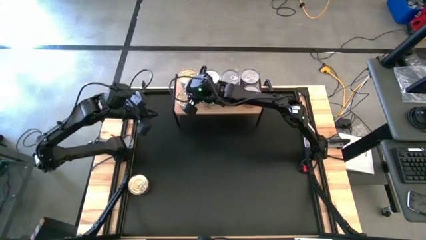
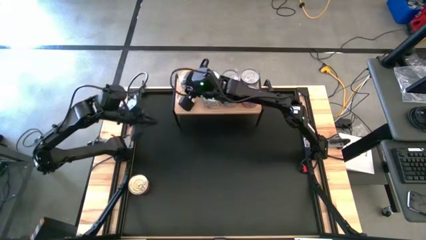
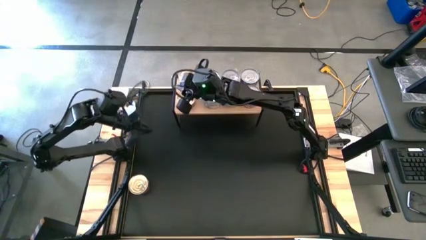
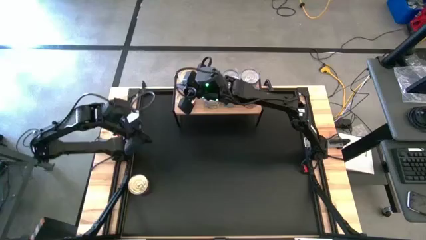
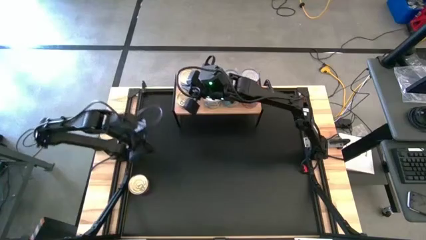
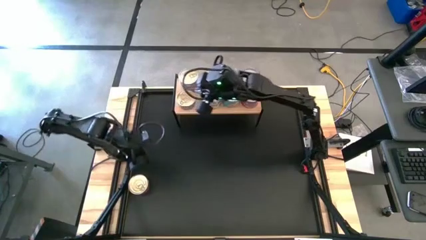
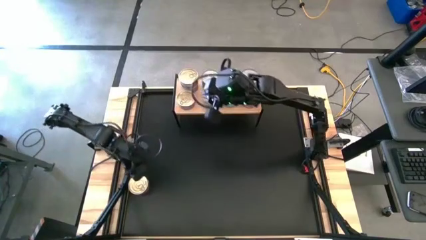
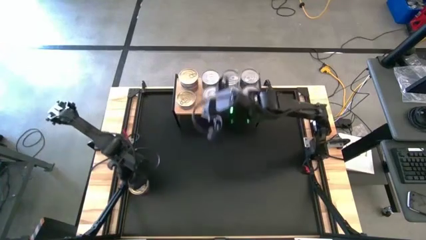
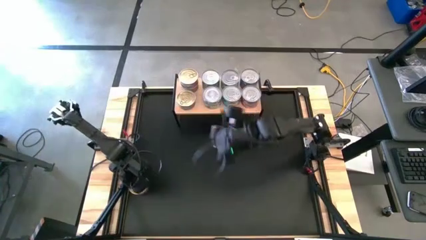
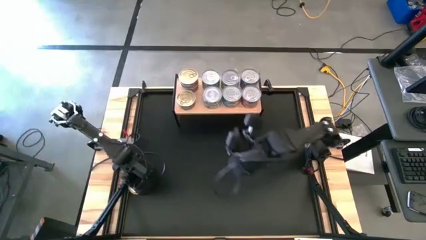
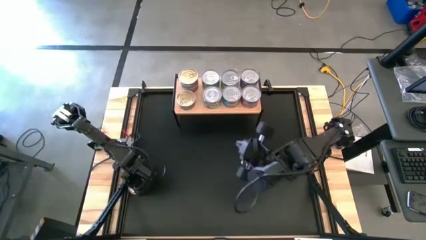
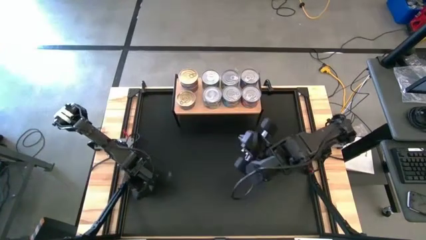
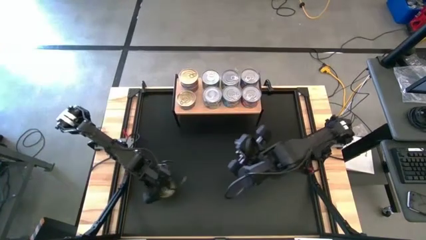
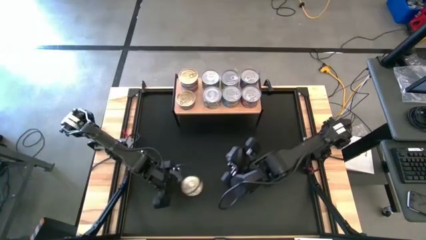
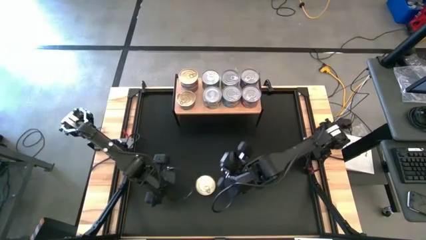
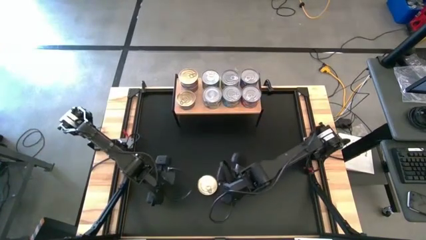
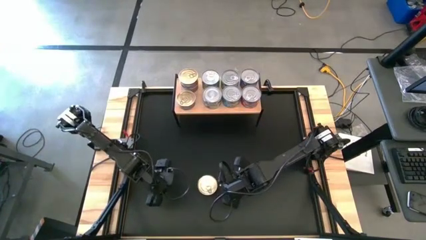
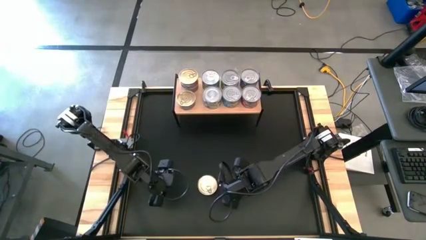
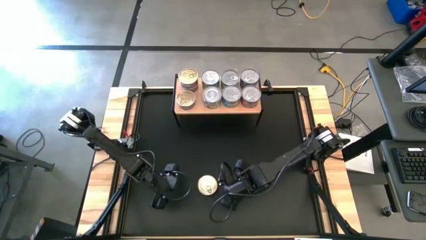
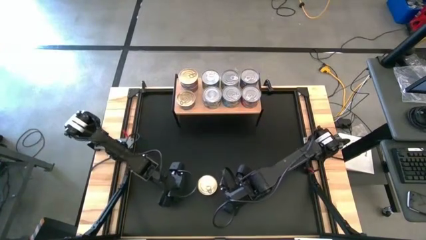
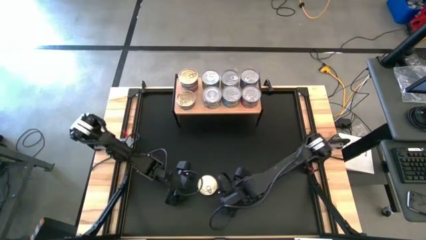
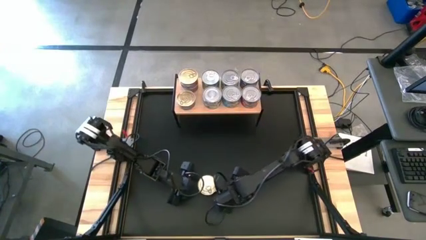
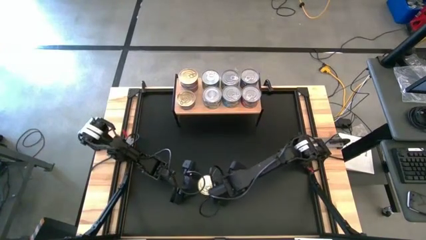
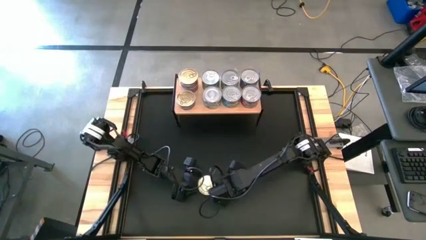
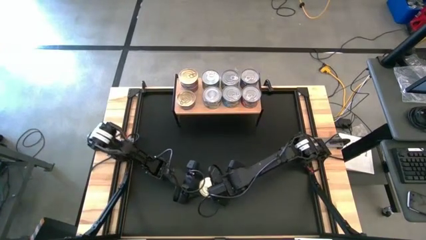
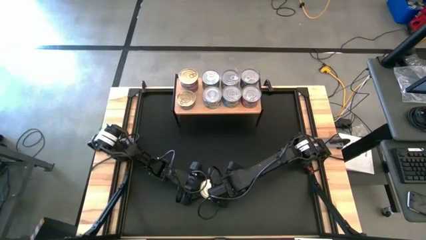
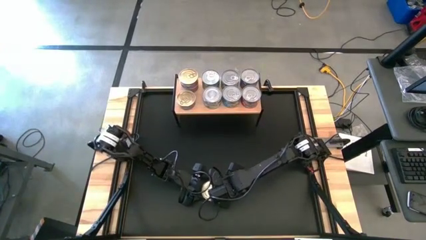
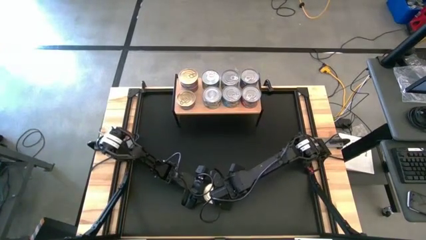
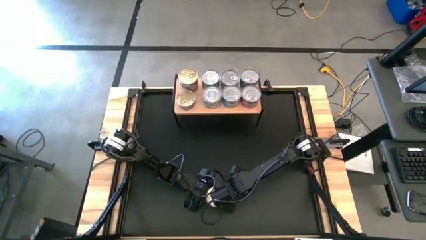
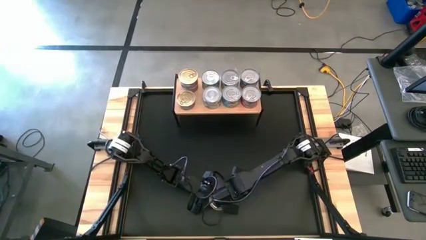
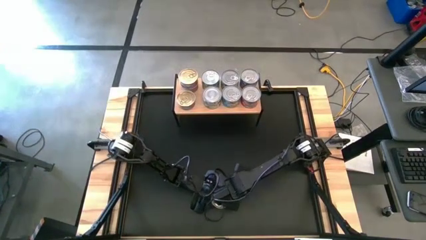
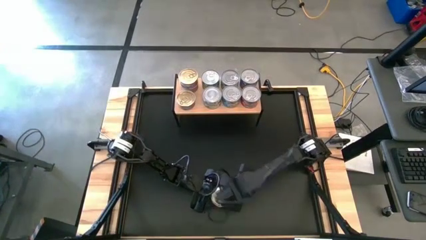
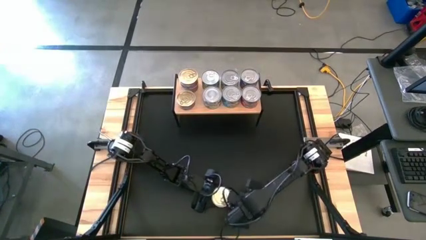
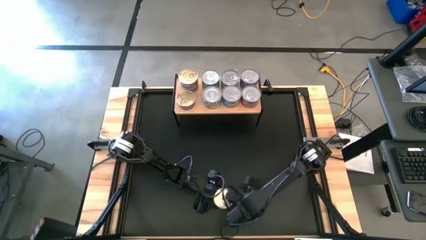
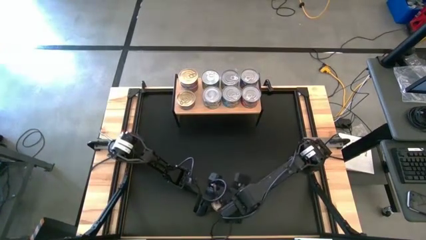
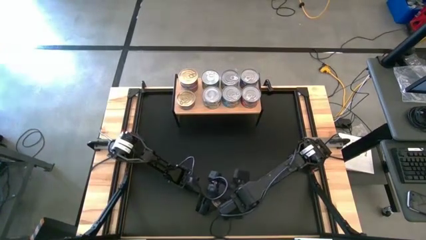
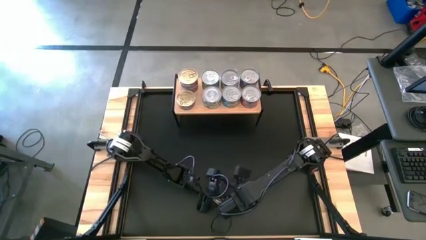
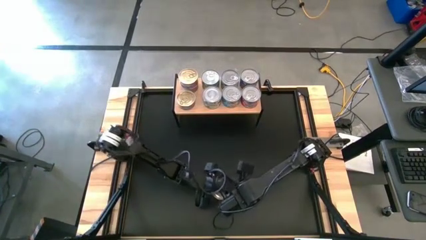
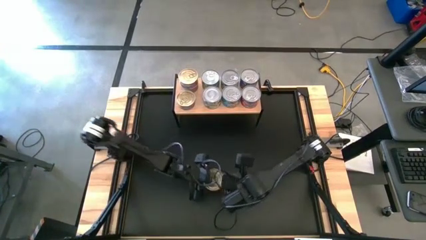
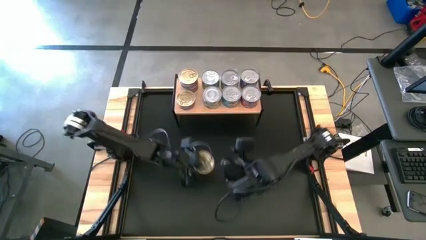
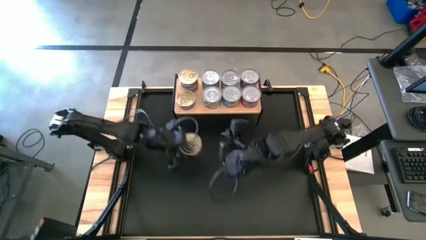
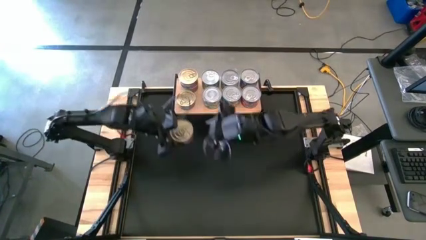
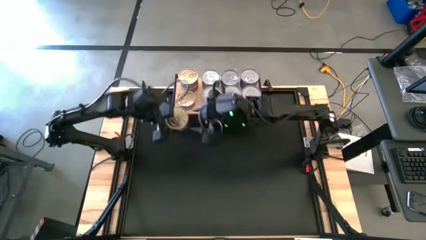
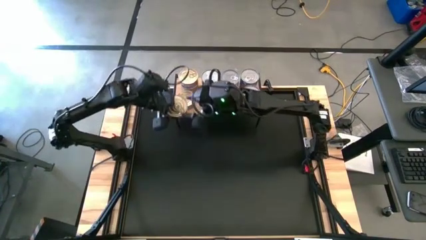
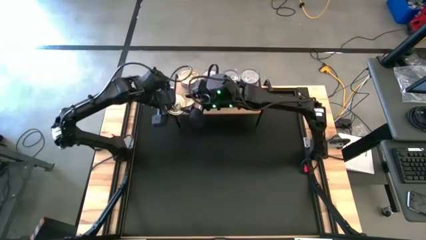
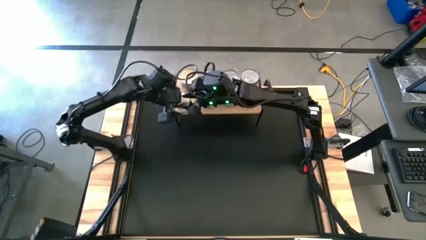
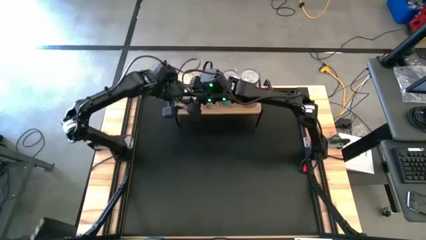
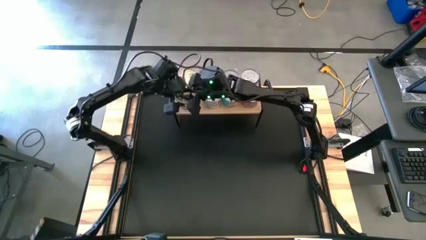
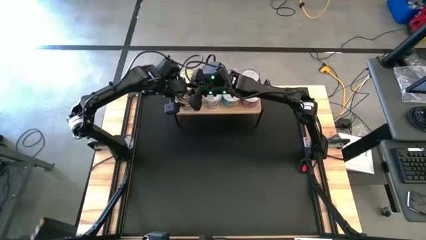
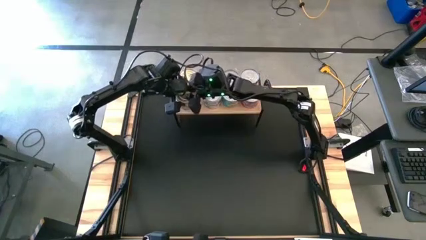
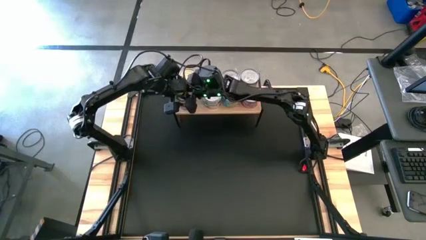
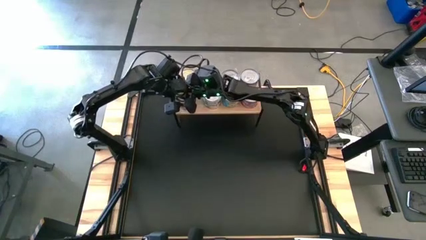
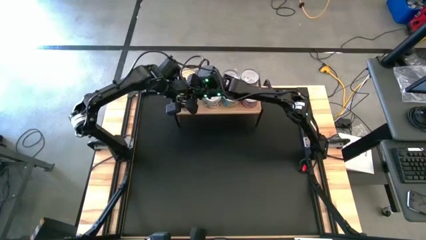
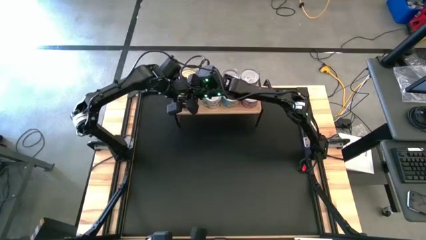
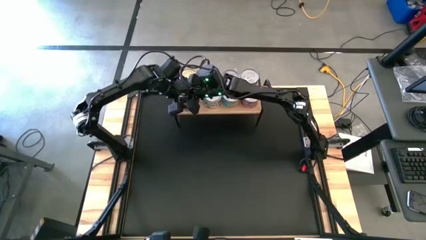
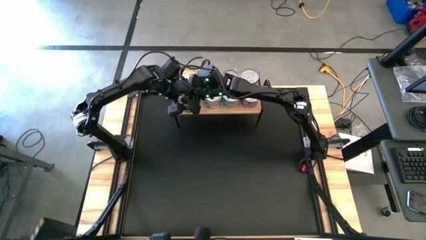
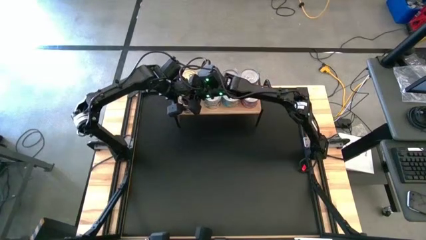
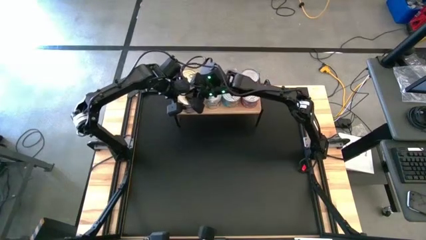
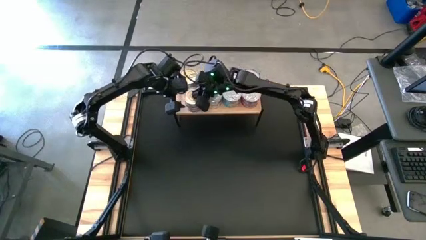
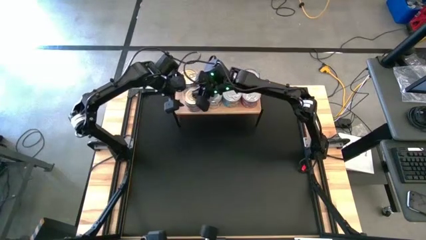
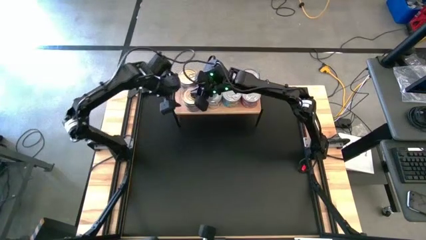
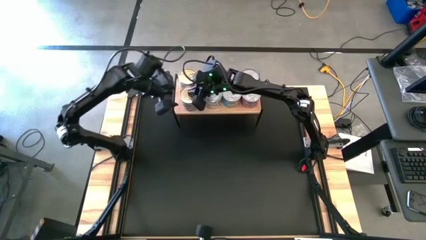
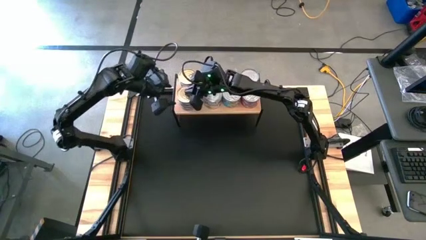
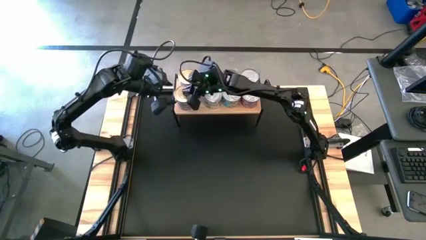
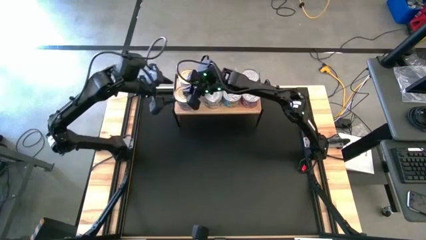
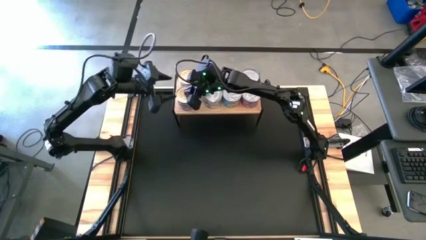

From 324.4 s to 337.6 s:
Task: Stack canned seafood by type on shelf
Stack the blue pink tuna can on top of the other blue pink tuna can on the shelf
